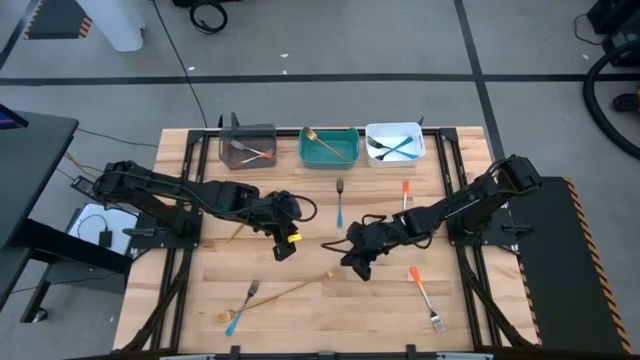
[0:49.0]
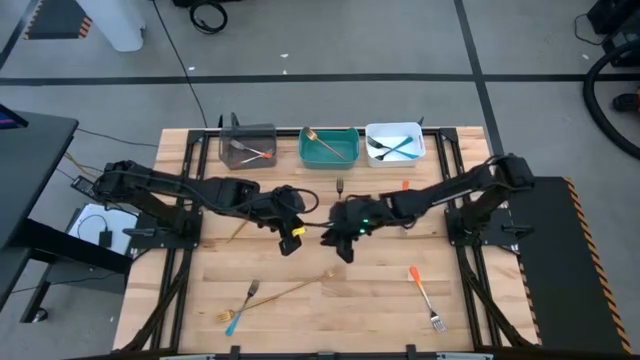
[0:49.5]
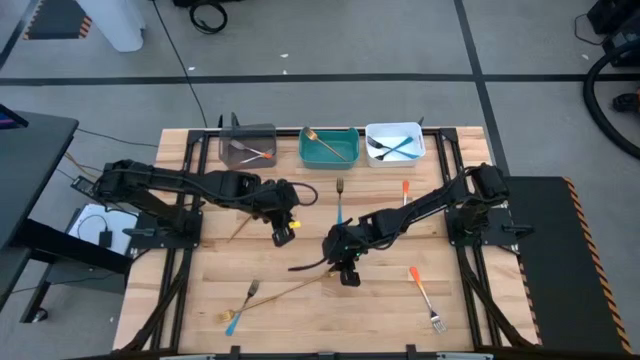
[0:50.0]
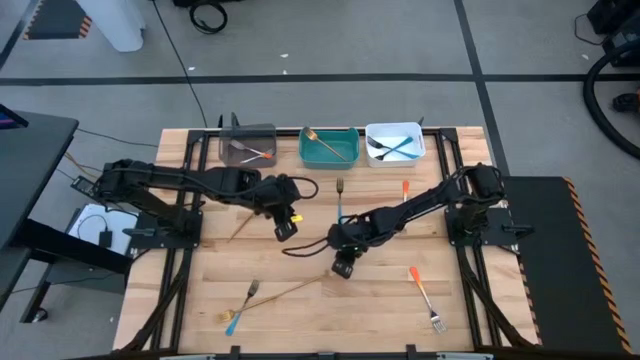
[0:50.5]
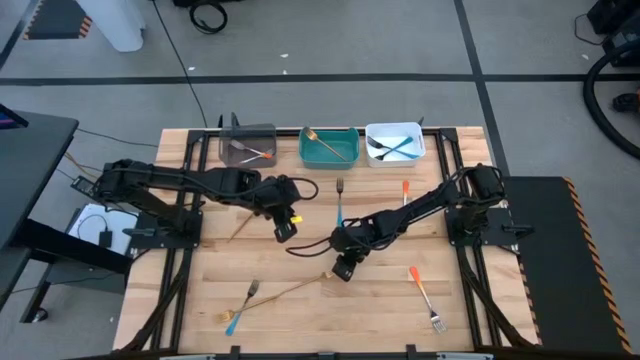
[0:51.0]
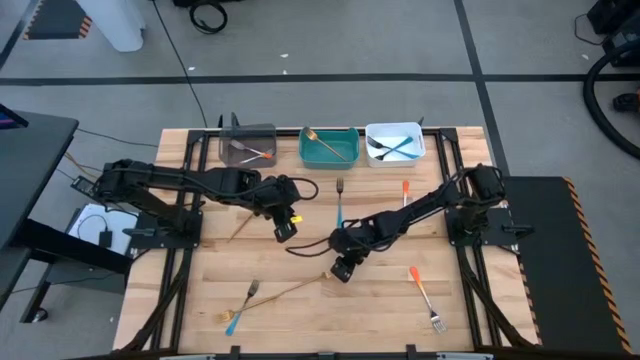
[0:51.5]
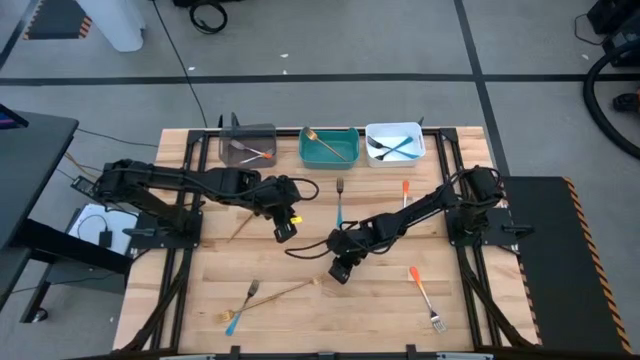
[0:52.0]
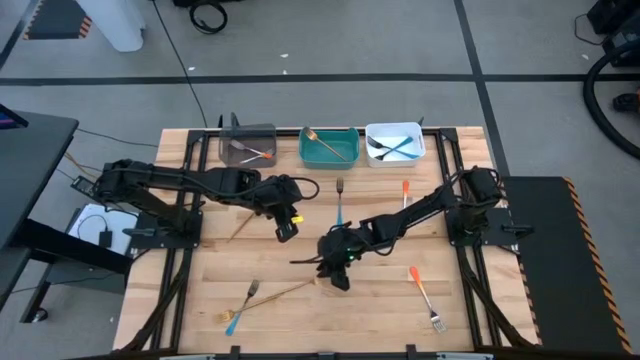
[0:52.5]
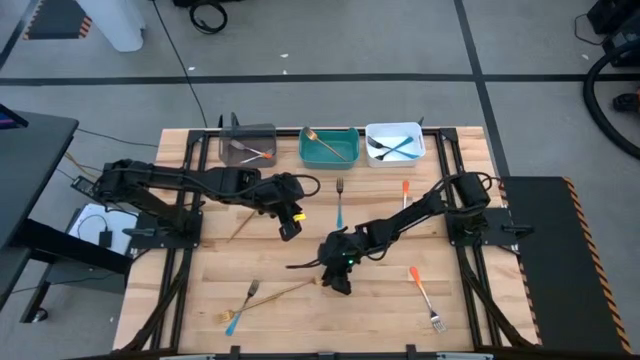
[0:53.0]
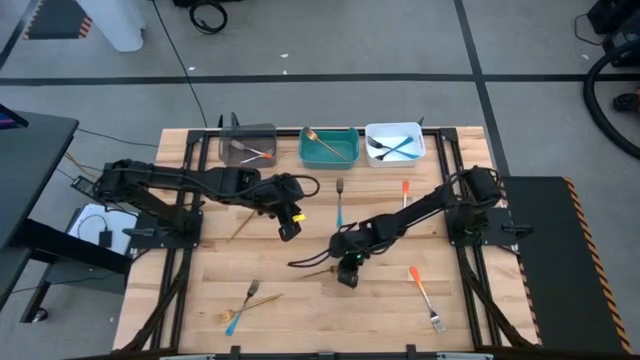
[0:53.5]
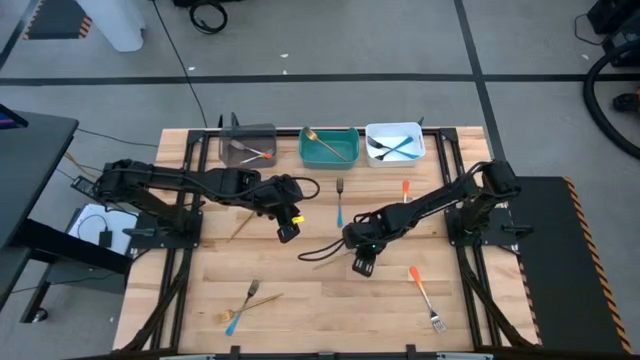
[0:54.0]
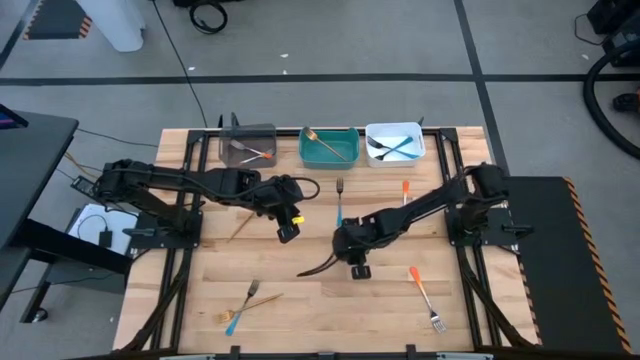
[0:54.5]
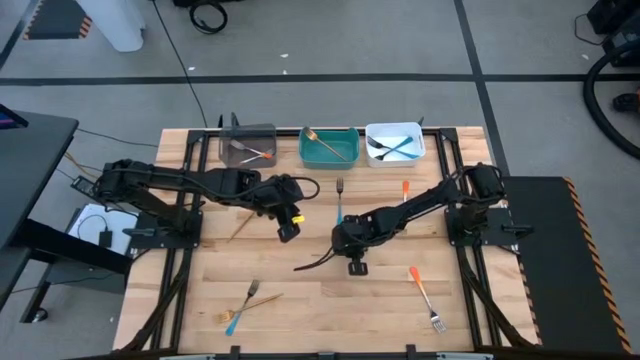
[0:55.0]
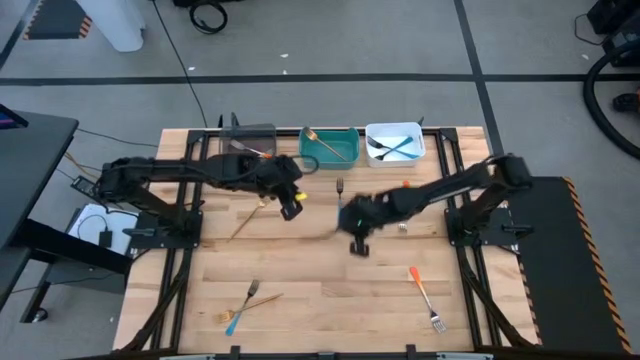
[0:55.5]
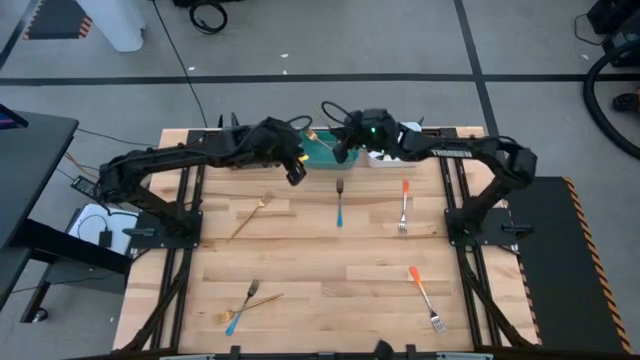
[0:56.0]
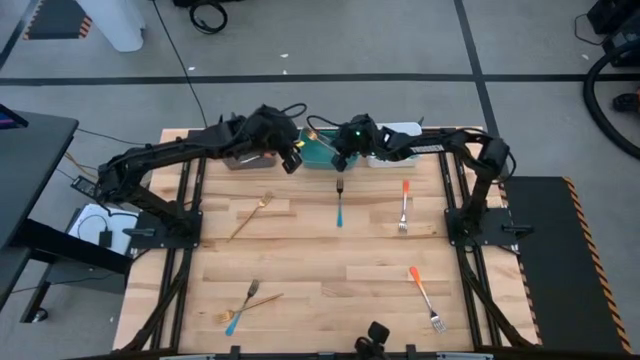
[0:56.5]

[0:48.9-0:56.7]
Task: Sort silverware by color (type)
Put the gold fork into the green bin

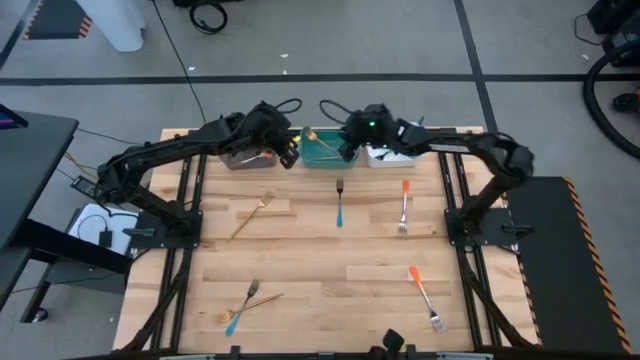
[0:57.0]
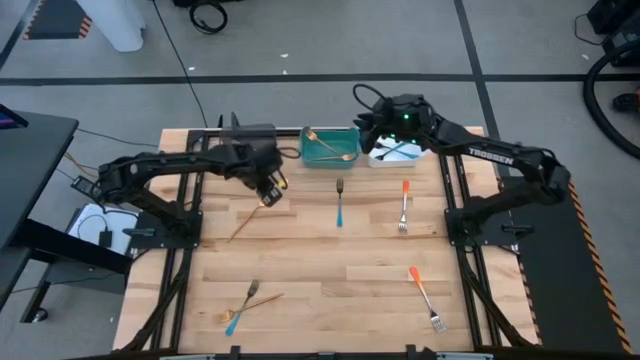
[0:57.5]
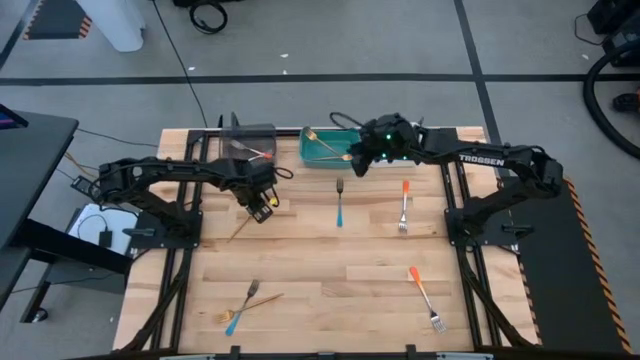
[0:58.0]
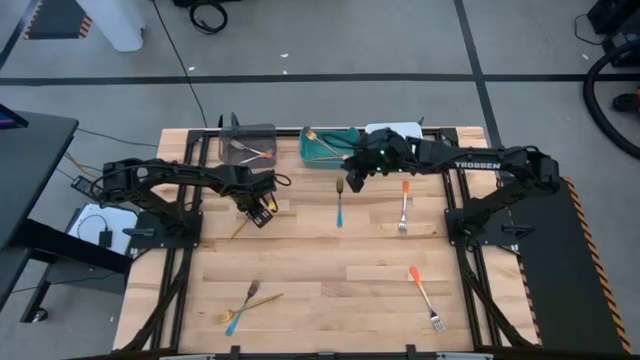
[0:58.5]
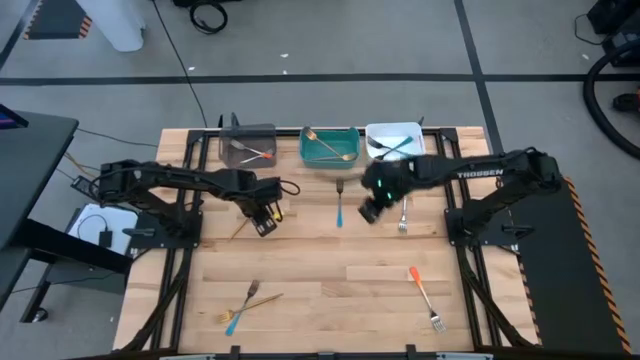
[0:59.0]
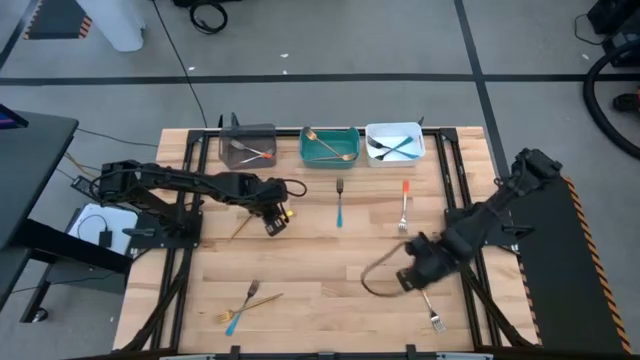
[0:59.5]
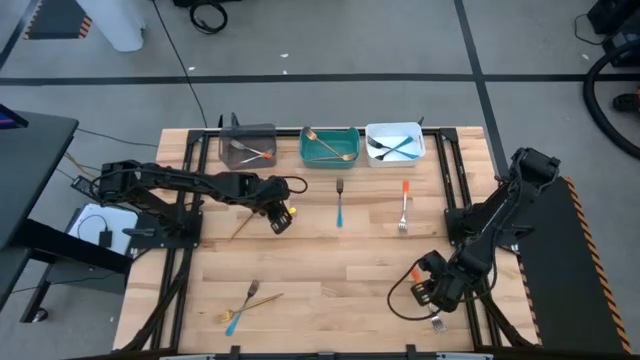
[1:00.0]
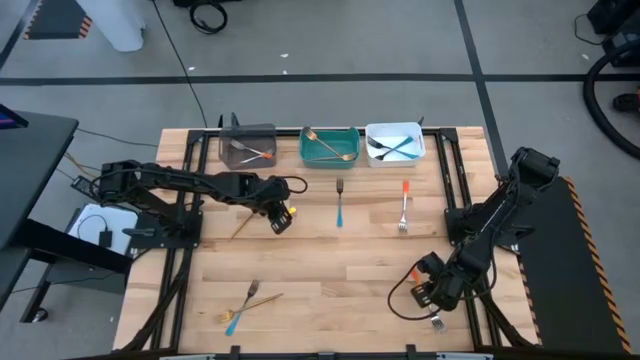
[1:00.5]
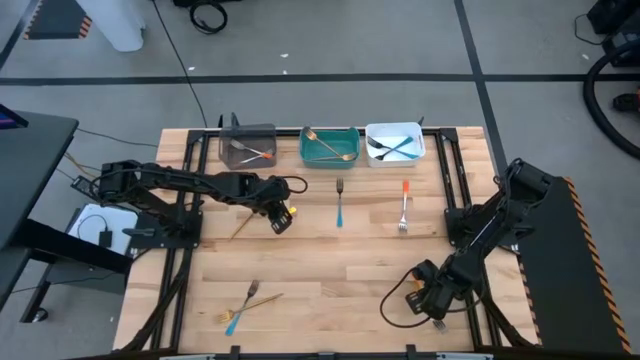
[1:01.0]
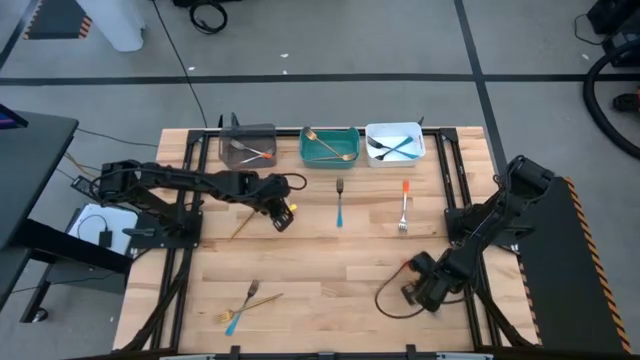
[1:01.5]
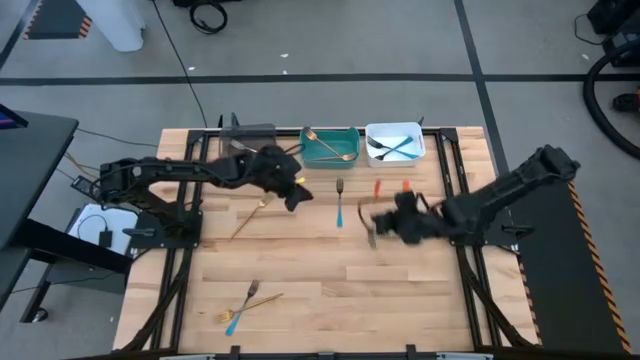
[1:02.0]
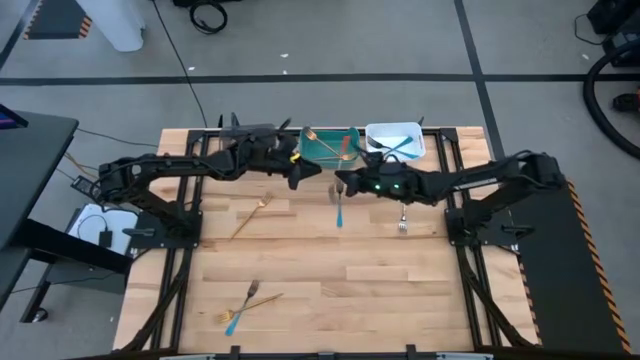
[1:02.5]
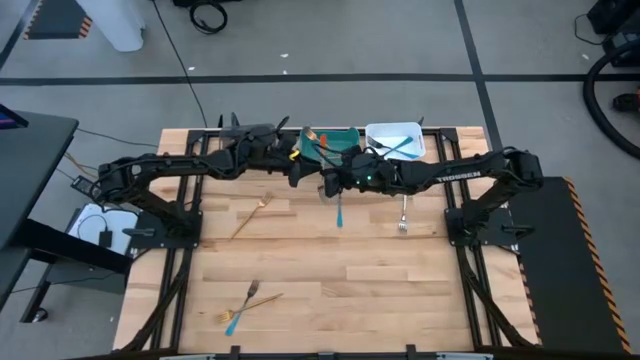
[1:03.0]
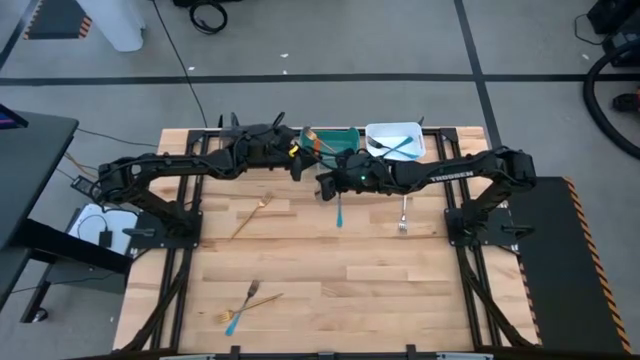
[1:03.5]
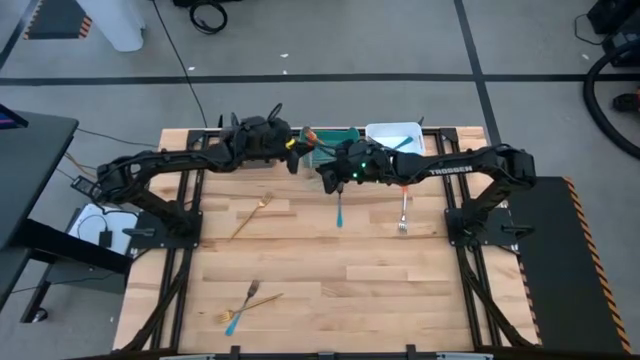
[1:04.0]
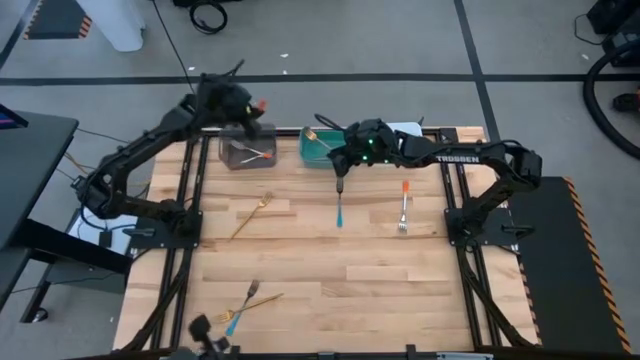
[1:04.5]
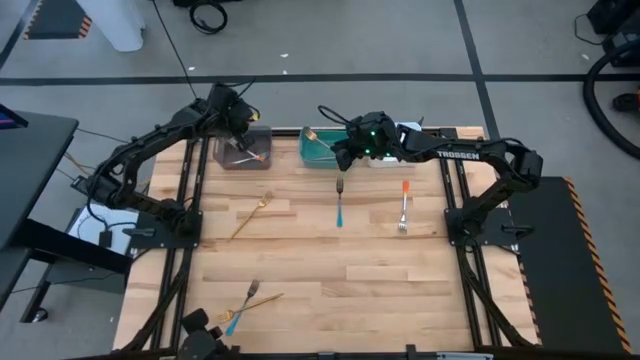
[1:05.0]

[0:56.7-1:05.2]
Put the orange fork into the black bin

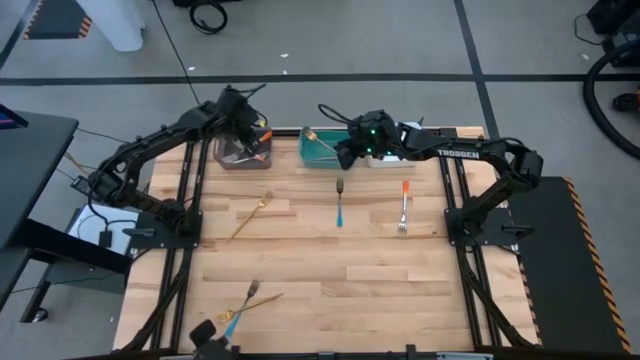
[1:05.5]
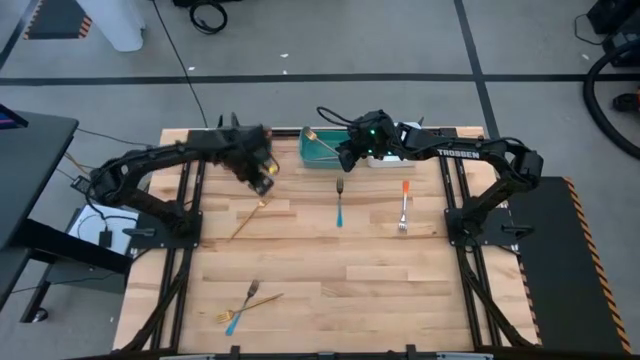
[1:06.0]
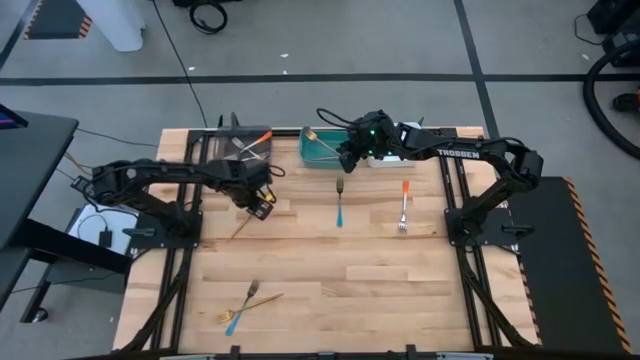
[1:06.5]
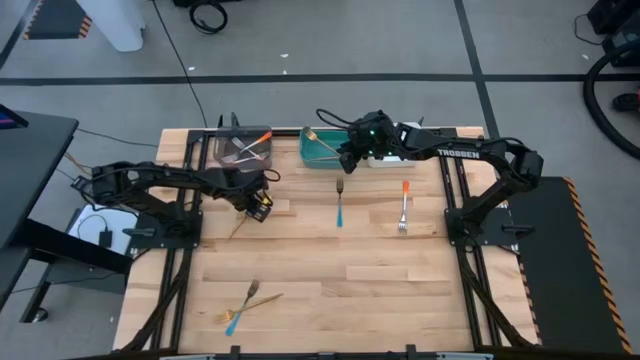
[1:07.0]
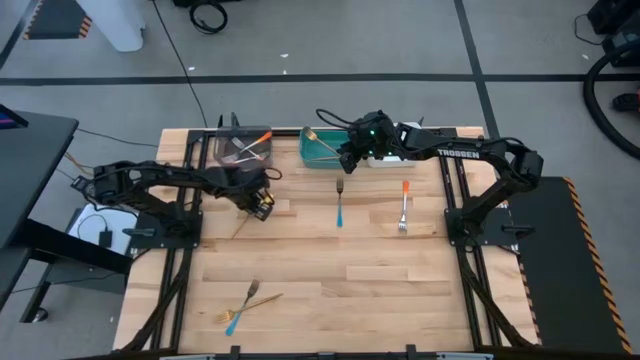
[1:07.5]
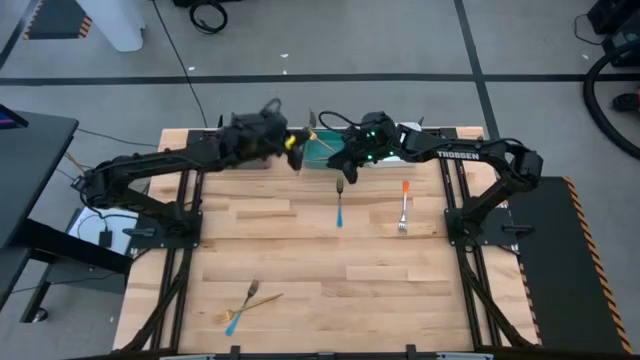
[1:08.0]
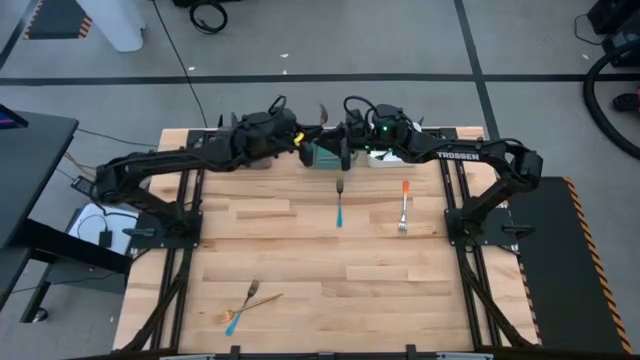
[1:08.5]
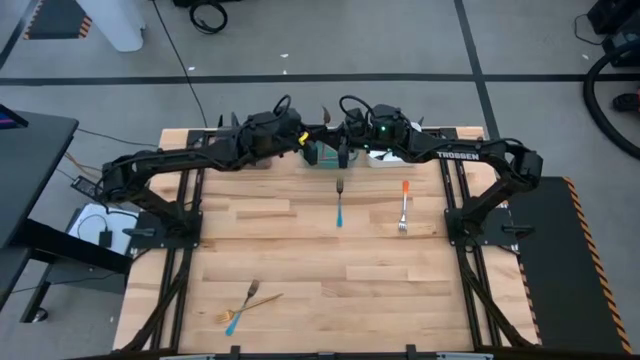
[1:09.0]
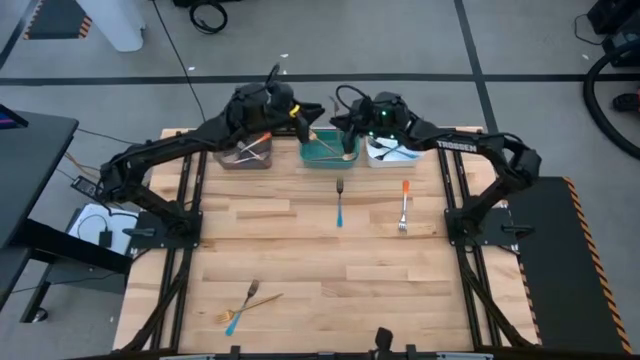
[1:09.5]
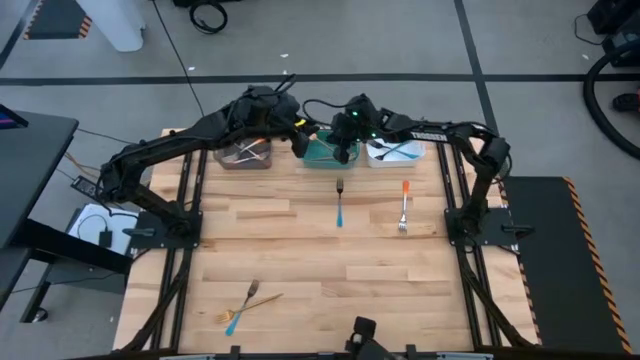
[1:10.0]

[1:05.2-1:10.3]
Put the gold fork into the green bin
